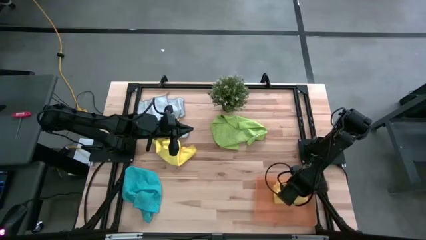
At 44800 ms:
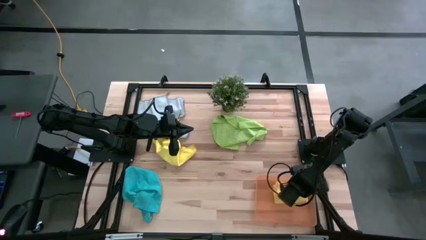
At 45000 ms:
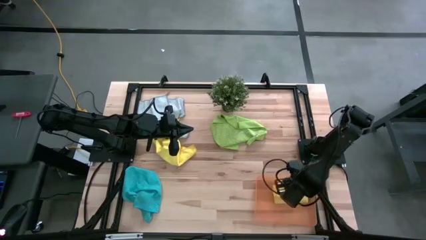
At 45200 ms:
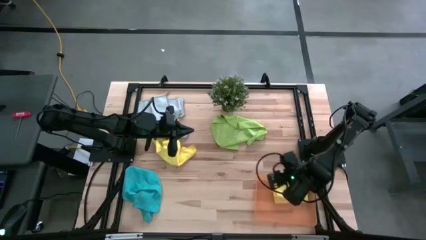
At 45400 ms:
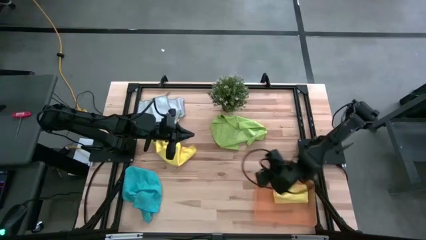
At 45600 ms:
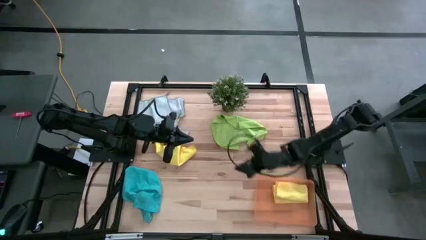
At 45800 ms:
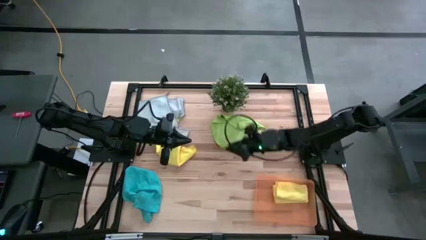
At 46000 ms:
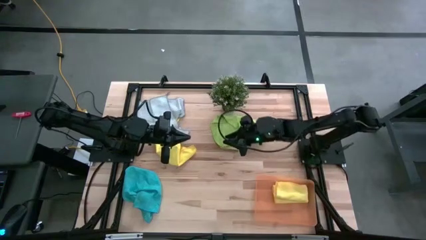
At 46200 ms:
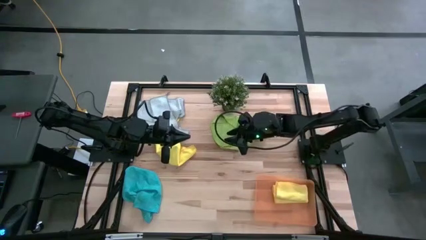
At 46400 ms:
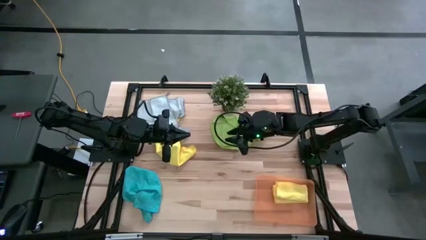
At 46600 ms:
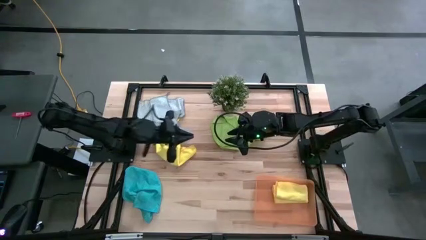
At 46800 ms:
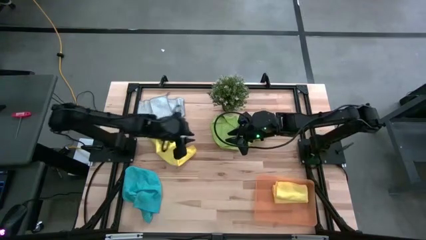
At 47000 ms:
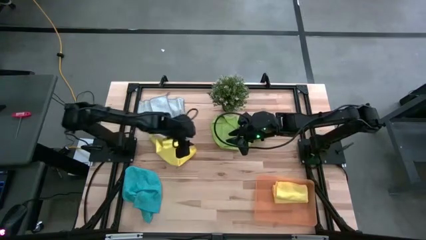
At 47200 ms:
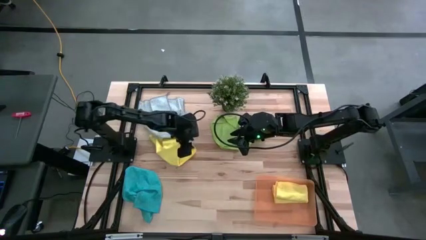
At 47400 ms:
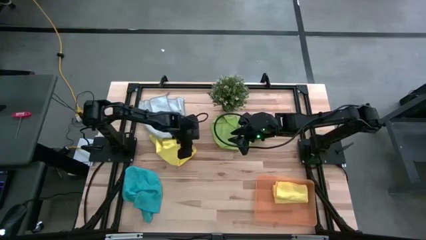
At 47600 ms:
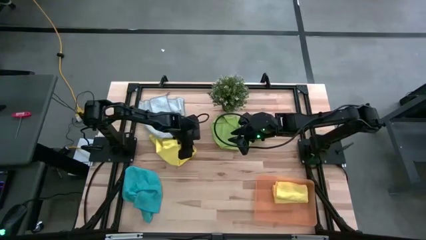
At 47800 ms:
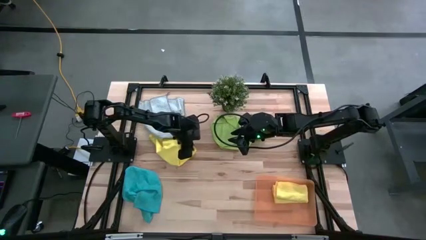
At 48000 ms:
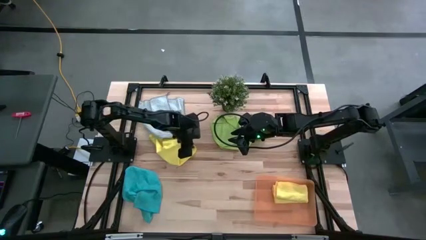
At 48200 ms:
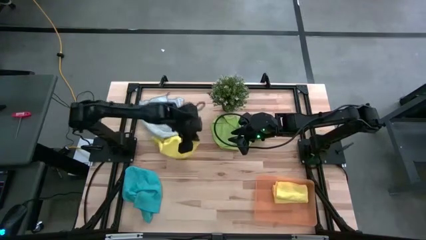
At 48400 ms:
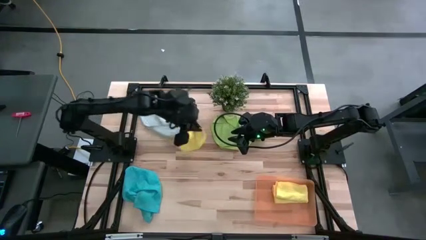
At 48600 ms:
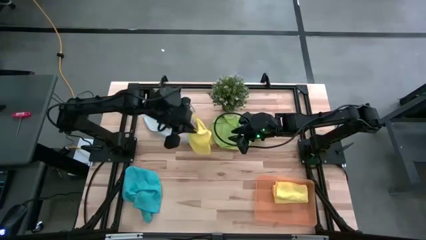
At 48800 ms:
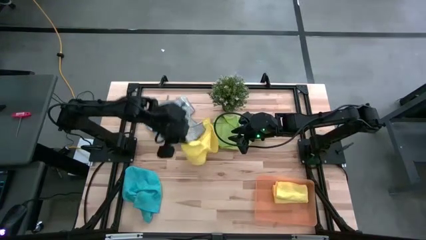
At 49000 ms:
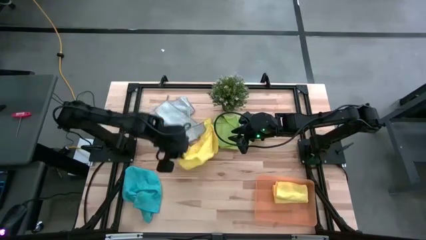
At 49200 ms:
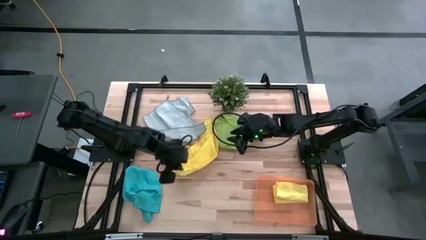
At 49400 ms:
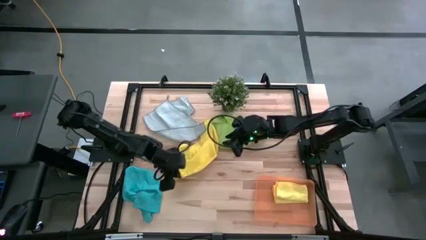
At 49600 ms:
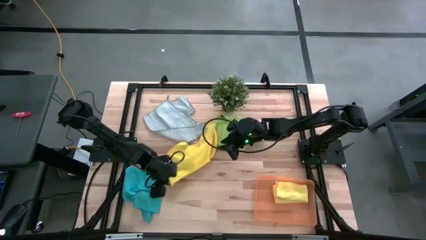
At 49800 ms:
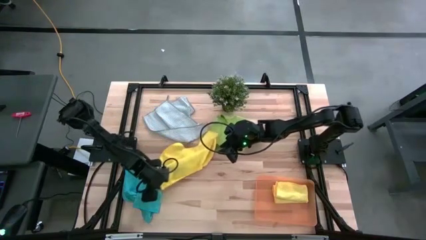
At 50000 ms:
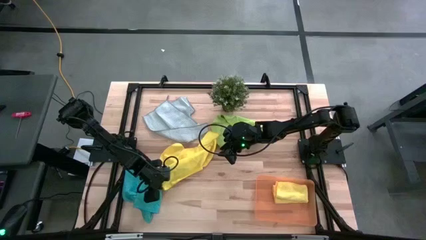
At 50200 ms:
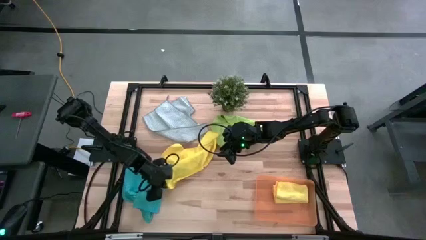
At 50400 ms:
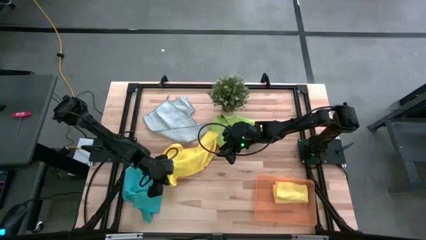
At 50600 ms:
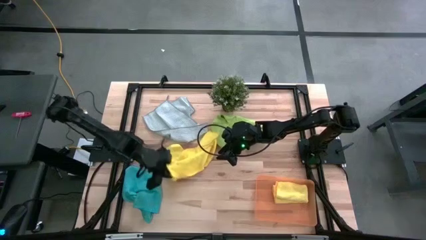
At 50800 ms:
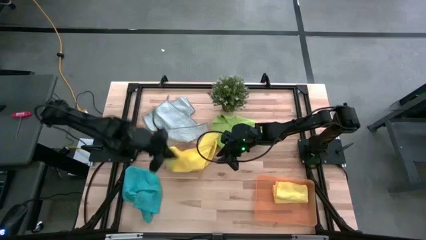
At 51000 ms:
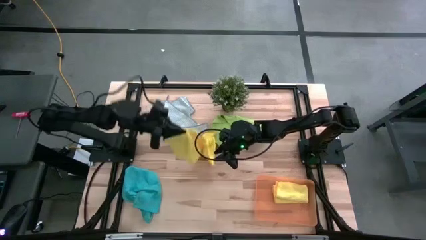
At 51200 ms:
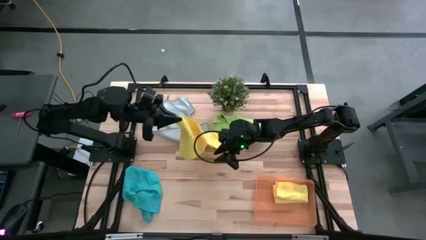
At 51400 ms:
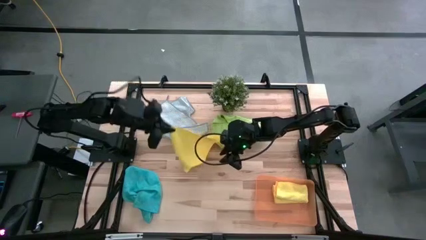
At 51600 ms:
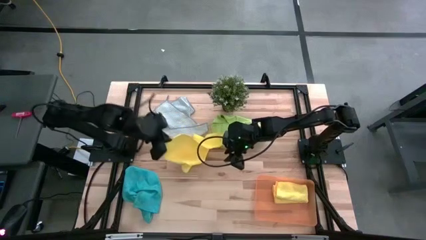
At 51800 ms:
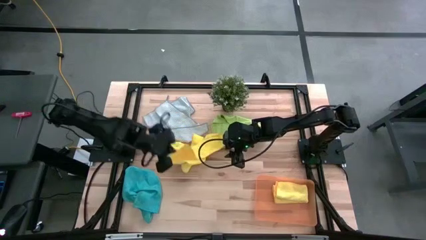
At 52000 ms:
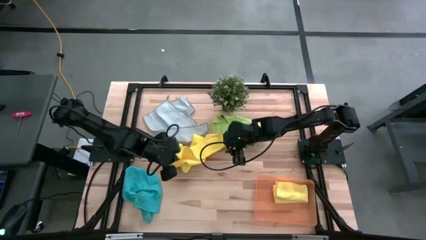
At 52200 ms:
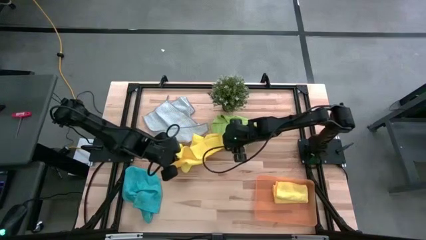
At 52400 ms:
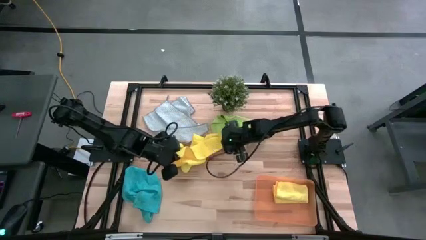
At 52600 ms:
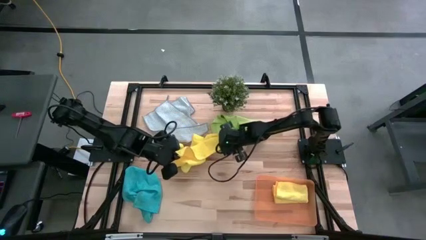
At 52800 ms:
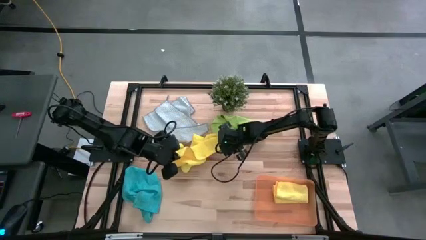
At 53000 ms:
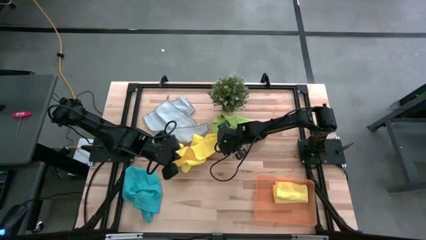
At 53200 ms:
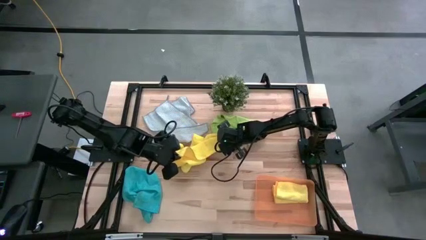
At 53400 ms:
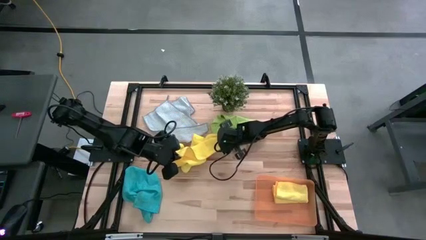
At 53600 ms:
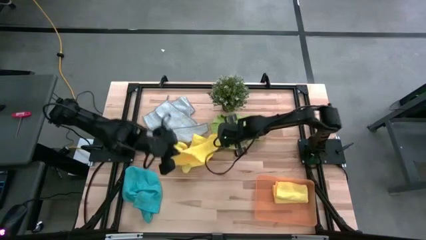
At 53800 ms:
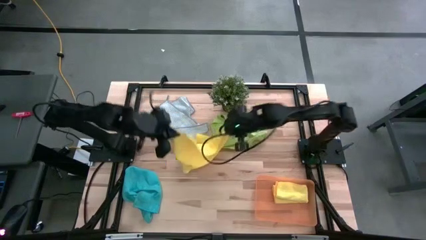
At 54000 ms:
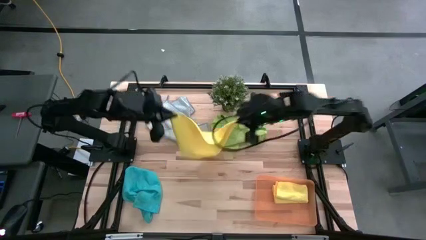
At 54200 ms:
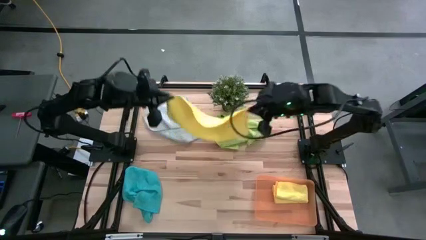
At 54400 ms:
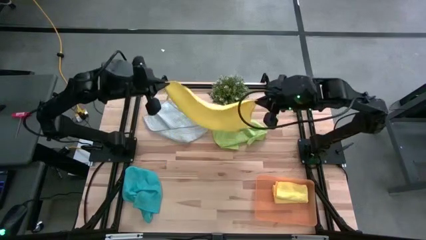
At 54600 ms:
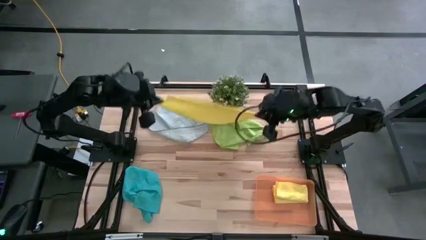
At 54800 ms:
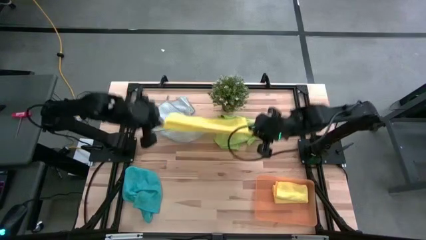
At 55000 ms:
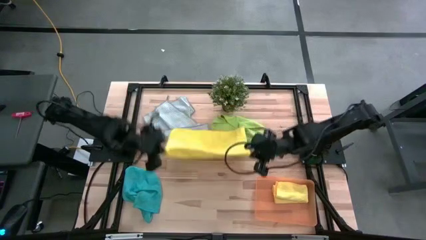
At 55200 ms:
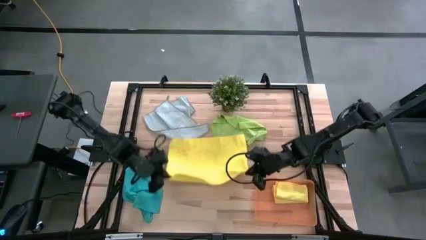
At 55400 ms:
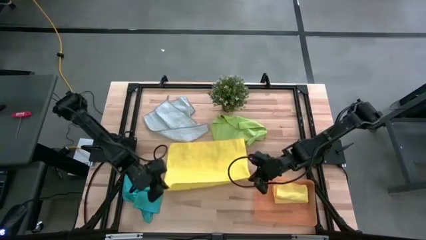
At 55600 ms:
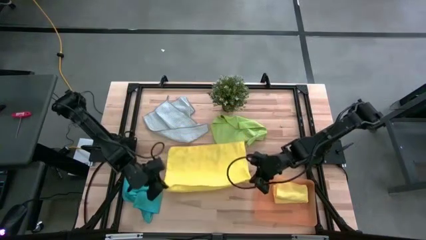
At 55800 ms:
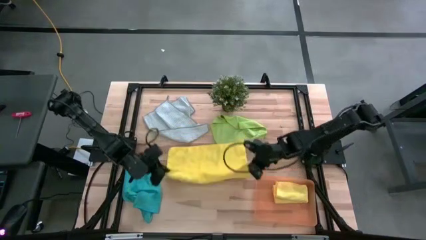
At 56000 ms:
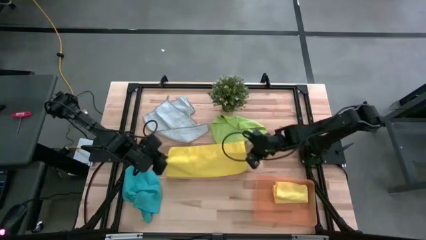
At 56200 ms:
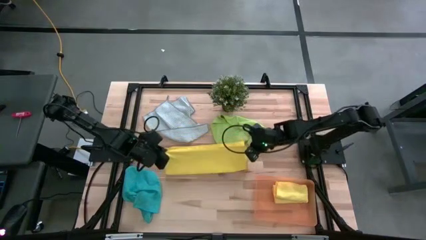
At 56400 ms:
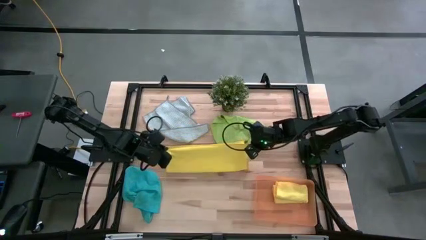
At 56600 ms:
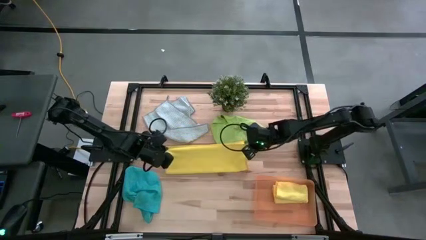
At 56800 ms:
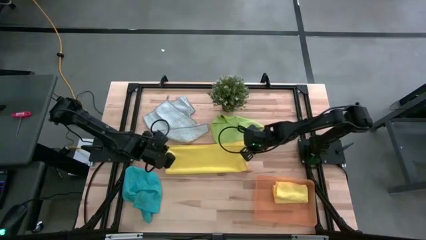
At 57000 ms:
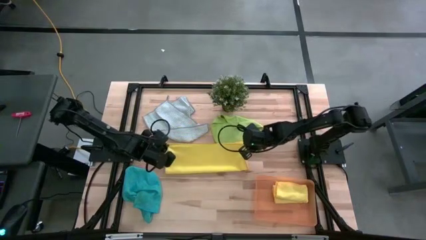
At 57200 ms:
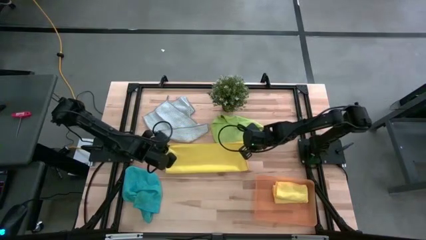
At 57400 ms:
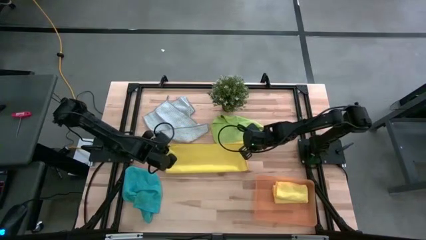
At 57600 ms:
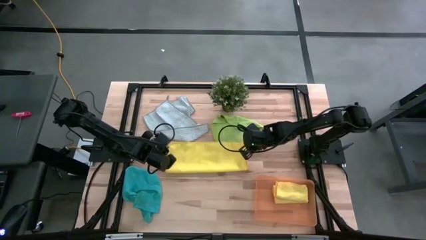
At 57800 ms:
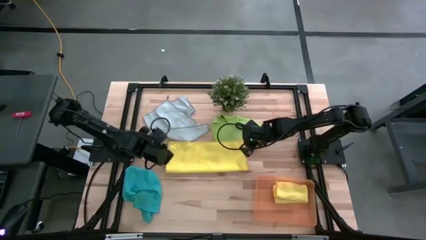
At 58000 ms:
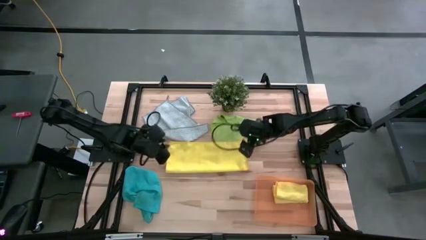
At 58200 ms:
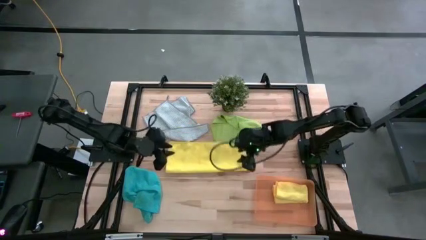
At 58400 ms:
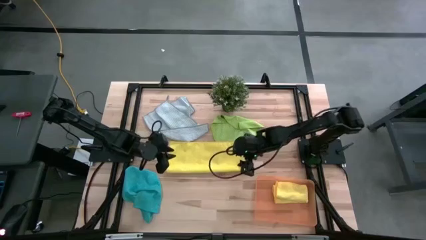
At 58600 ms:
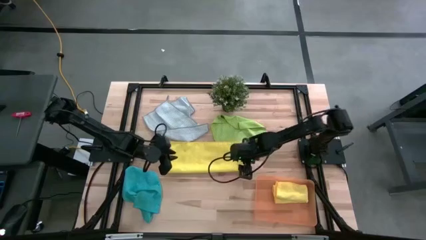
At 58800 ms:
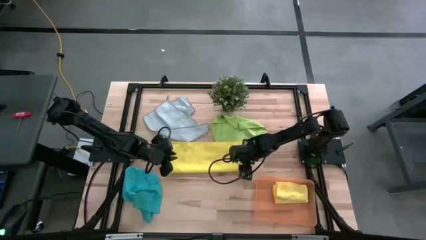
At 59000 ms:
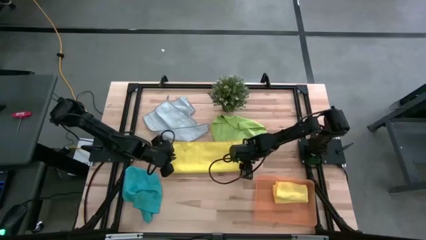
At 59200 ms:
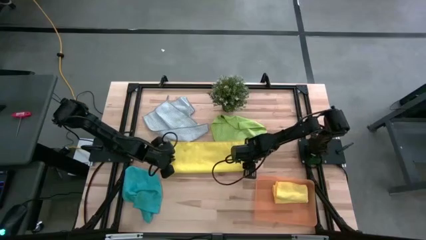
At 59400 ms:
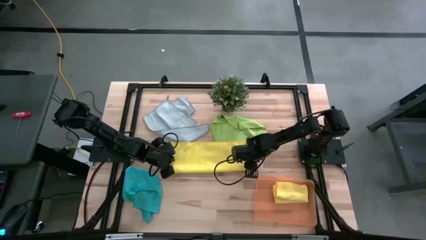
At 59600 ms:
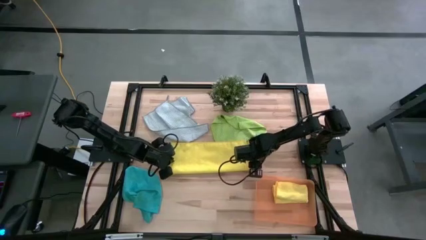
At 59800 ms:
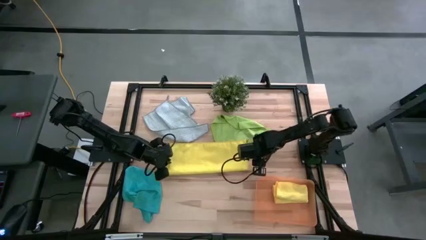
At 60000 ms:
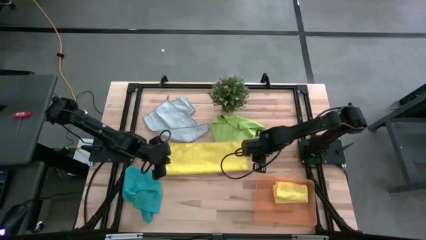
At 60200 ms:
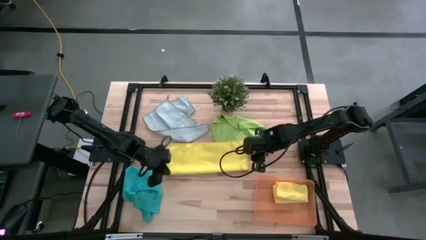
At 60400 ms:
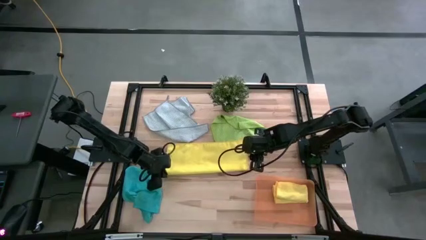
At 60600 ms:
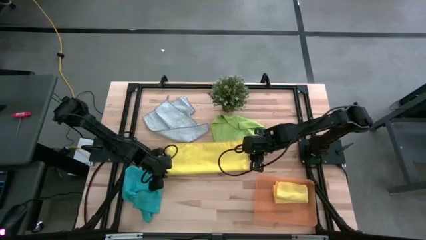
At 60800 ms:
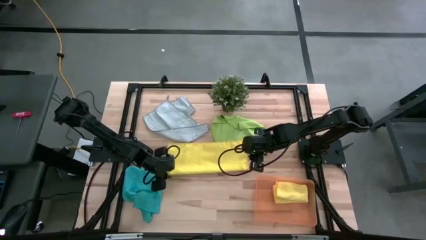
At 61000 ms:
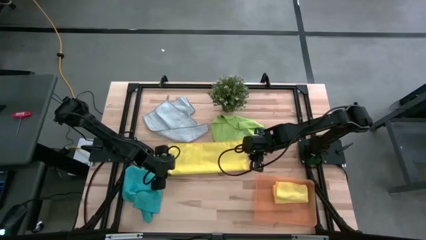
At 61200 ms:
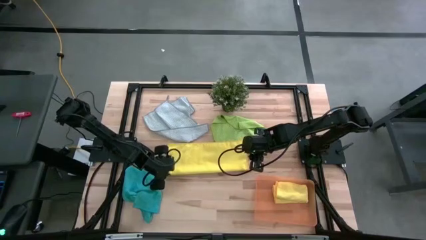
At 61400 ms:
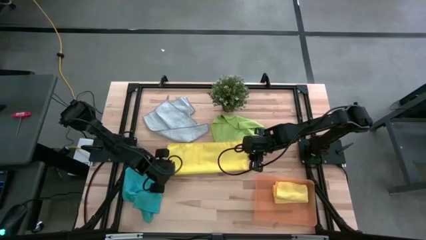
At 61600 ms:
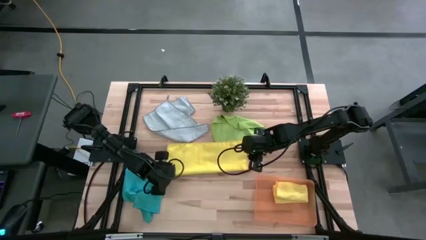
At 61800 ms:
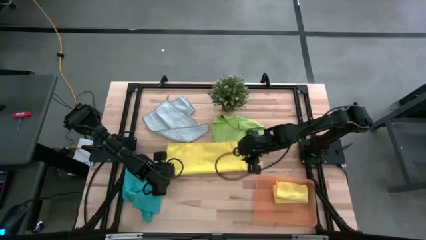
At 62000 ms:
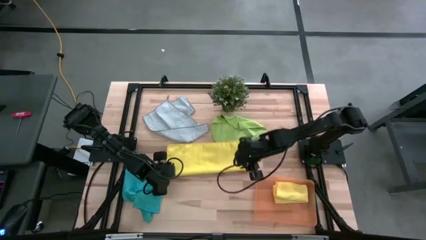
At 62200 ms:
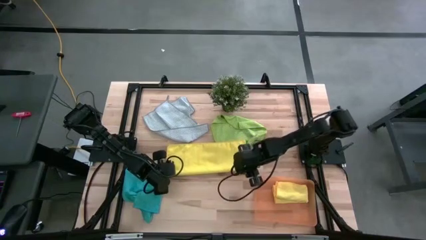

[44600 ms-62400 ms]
Task: Fold microfiber towels
Fold the yellow microfiber towel
